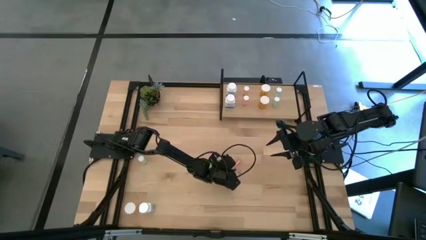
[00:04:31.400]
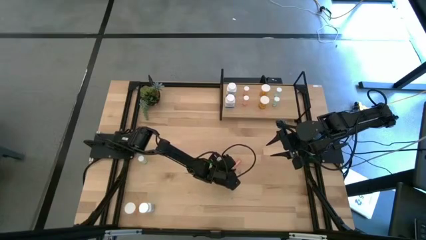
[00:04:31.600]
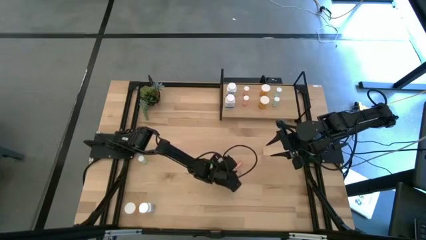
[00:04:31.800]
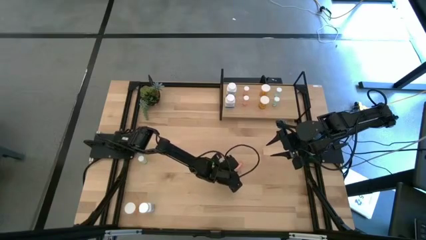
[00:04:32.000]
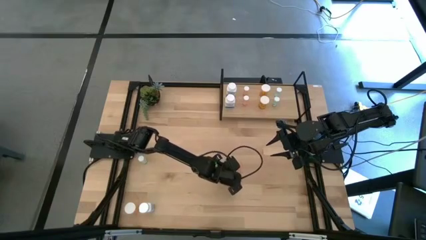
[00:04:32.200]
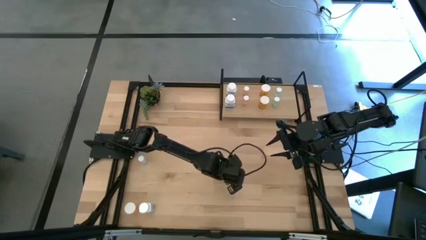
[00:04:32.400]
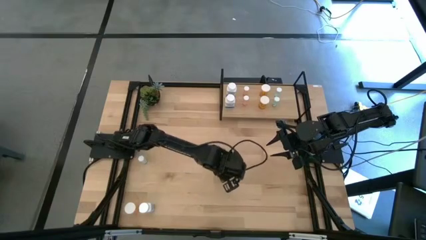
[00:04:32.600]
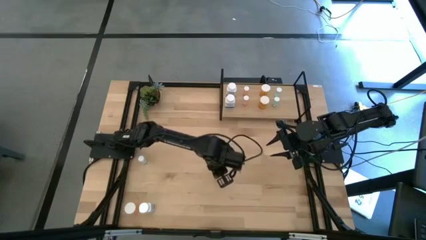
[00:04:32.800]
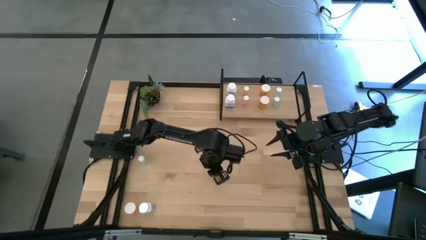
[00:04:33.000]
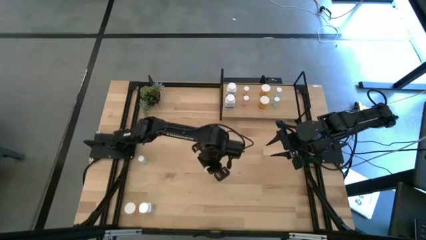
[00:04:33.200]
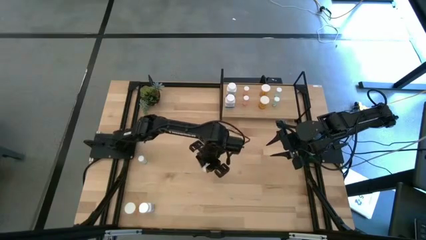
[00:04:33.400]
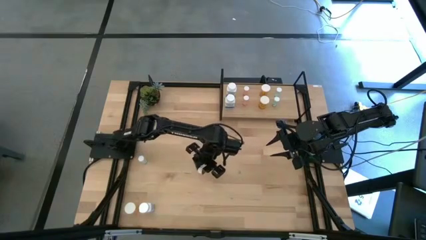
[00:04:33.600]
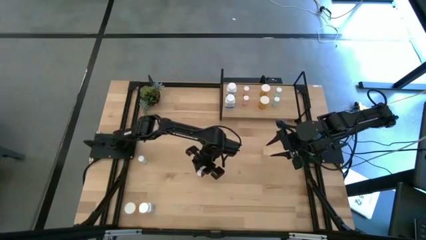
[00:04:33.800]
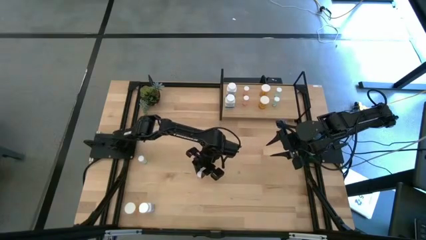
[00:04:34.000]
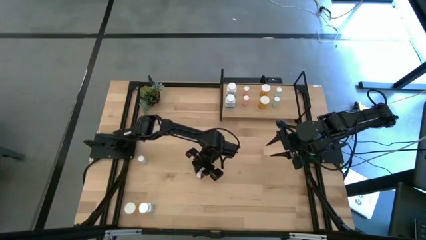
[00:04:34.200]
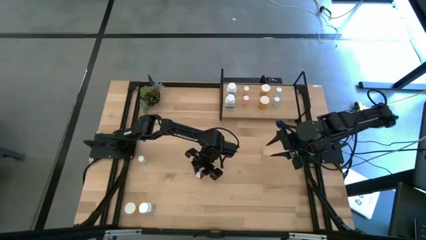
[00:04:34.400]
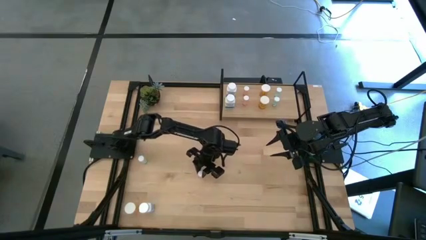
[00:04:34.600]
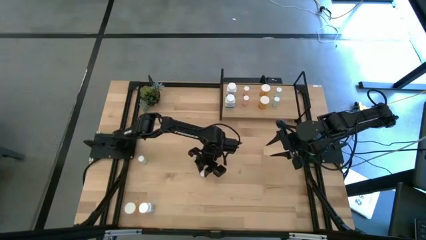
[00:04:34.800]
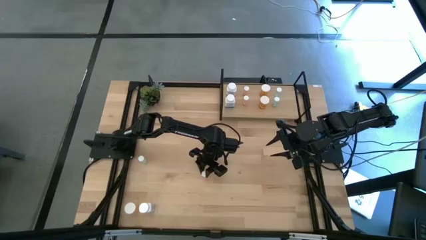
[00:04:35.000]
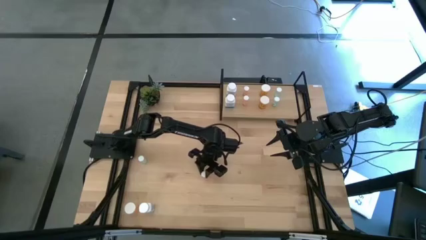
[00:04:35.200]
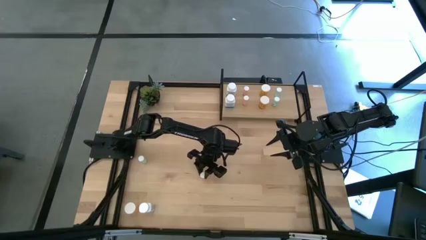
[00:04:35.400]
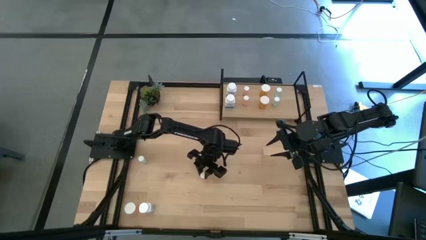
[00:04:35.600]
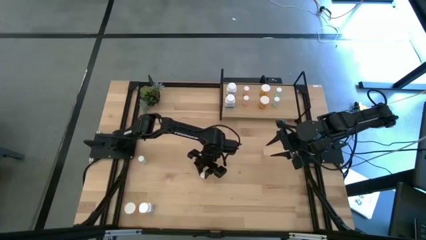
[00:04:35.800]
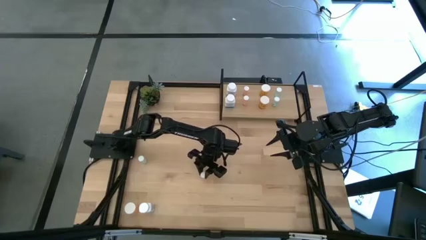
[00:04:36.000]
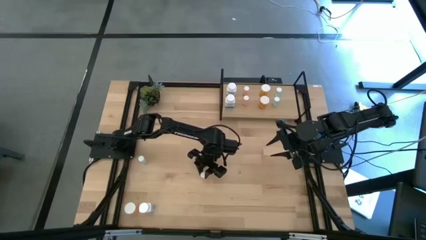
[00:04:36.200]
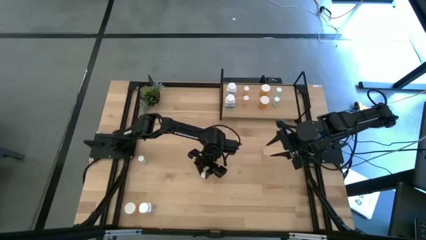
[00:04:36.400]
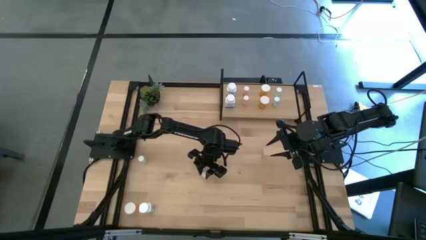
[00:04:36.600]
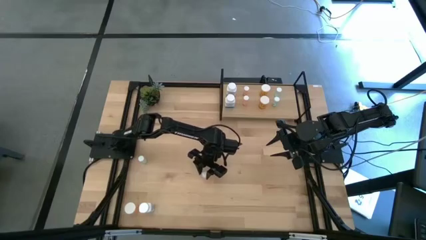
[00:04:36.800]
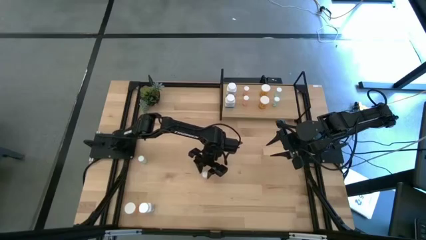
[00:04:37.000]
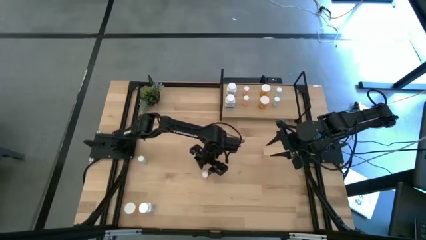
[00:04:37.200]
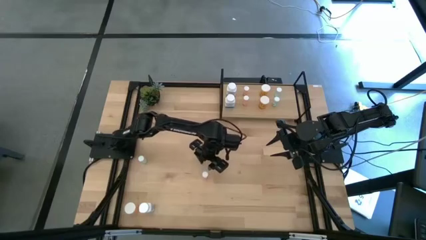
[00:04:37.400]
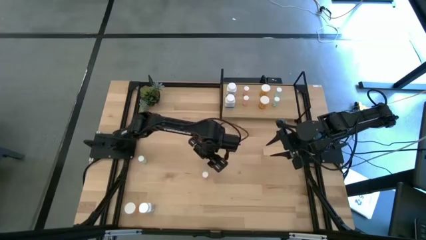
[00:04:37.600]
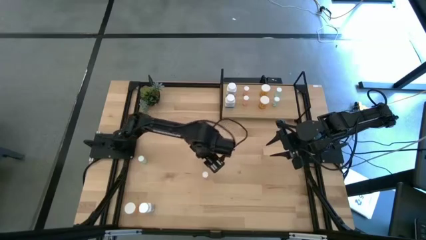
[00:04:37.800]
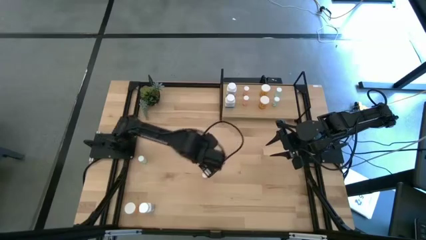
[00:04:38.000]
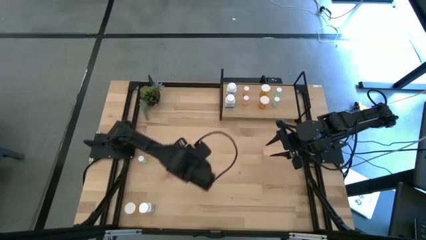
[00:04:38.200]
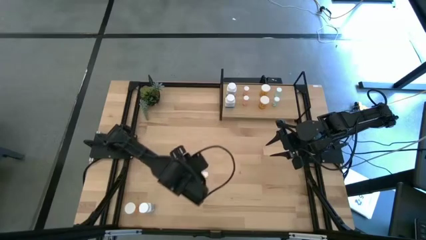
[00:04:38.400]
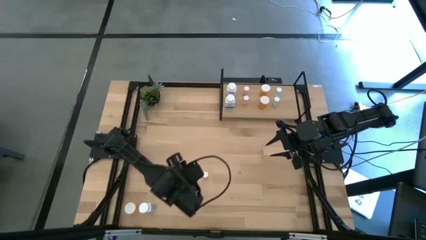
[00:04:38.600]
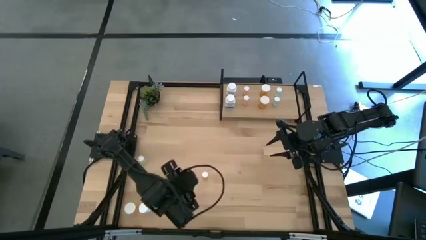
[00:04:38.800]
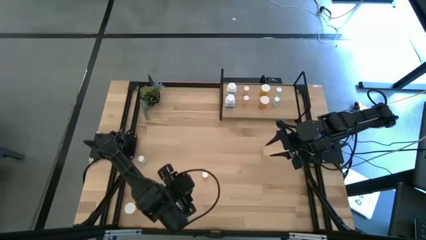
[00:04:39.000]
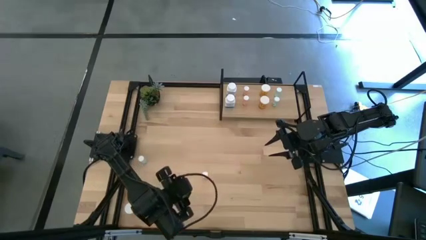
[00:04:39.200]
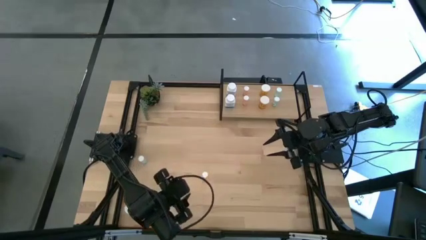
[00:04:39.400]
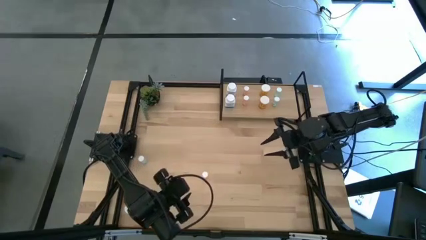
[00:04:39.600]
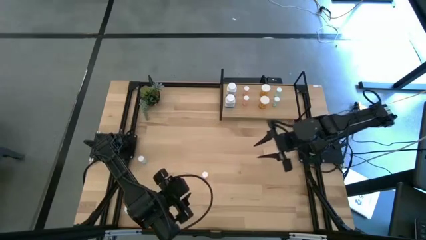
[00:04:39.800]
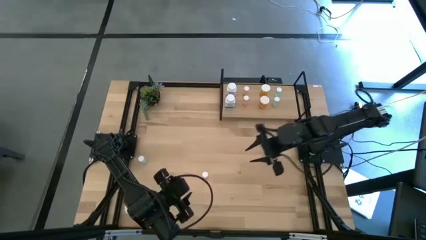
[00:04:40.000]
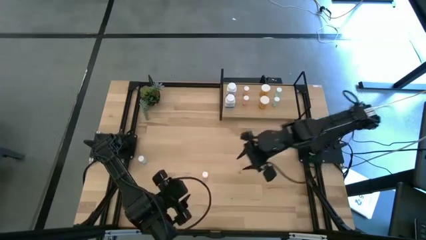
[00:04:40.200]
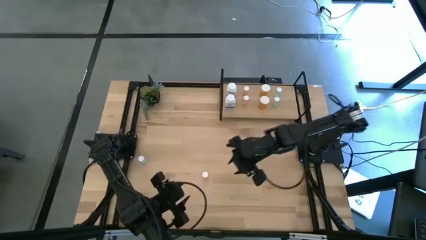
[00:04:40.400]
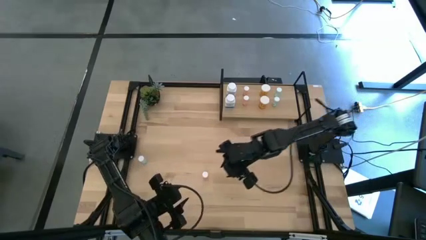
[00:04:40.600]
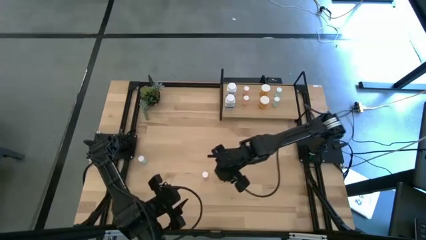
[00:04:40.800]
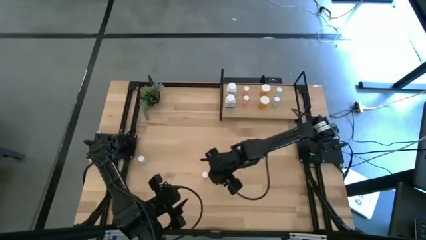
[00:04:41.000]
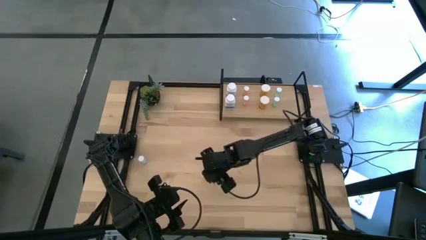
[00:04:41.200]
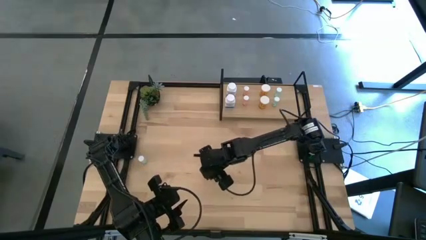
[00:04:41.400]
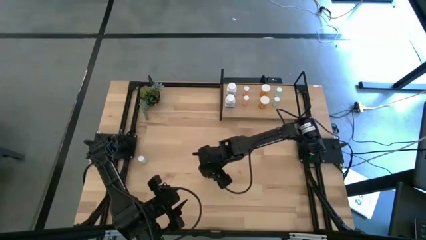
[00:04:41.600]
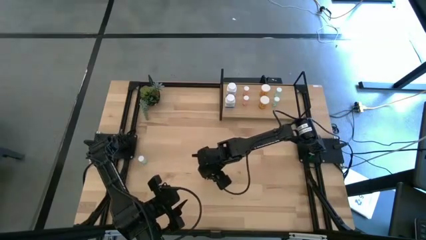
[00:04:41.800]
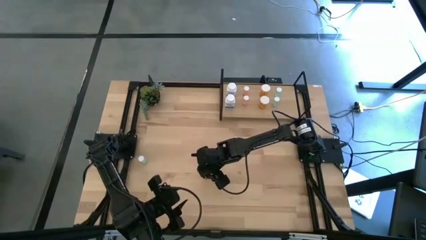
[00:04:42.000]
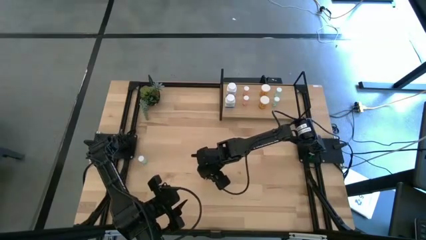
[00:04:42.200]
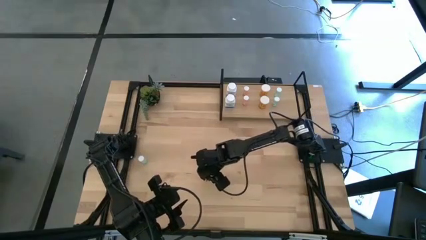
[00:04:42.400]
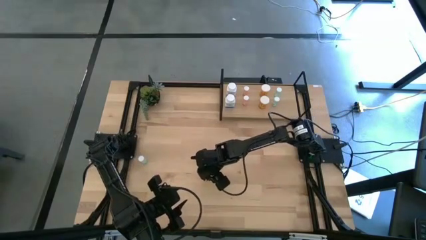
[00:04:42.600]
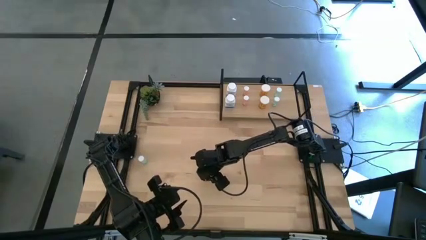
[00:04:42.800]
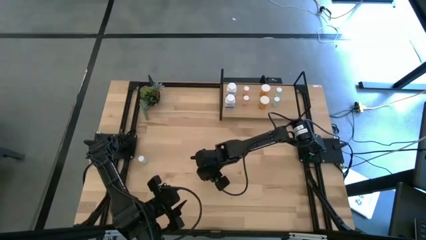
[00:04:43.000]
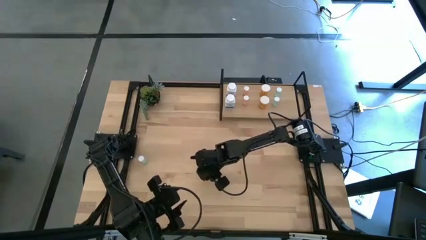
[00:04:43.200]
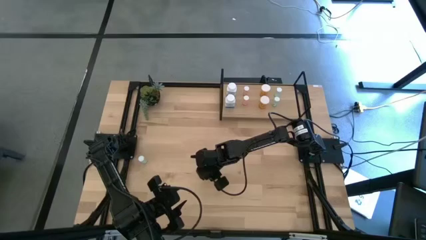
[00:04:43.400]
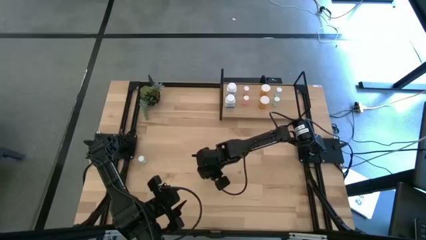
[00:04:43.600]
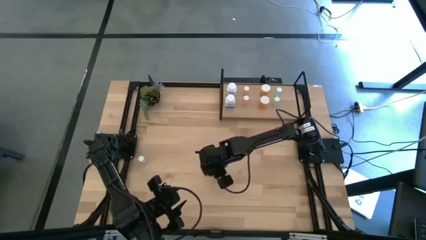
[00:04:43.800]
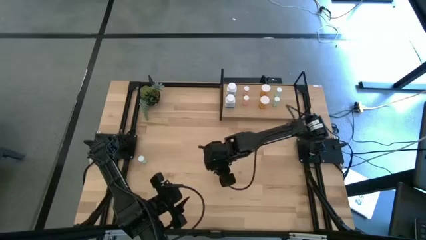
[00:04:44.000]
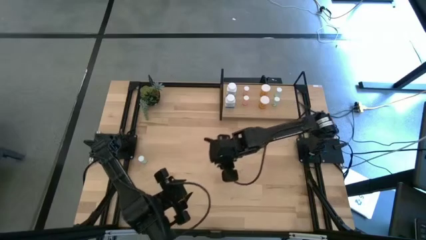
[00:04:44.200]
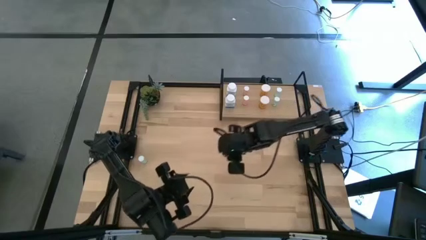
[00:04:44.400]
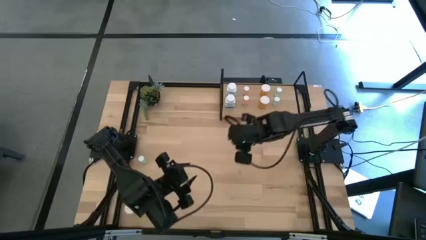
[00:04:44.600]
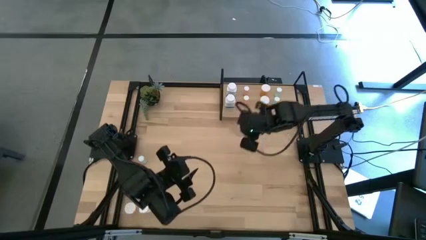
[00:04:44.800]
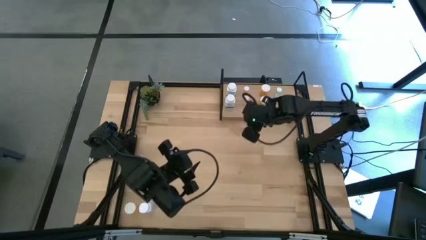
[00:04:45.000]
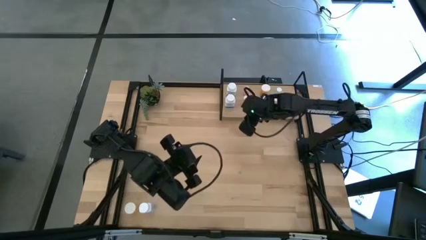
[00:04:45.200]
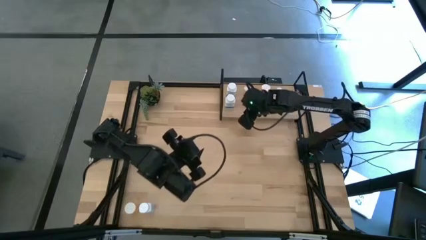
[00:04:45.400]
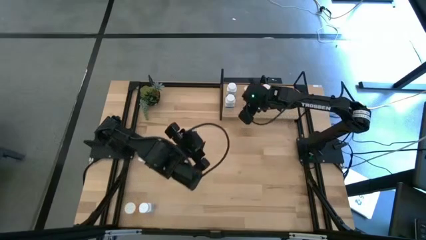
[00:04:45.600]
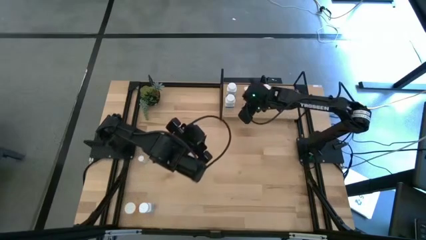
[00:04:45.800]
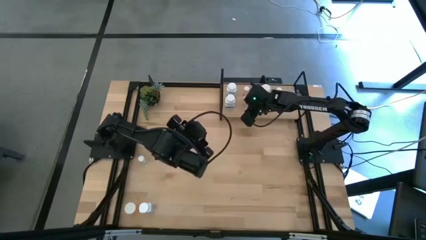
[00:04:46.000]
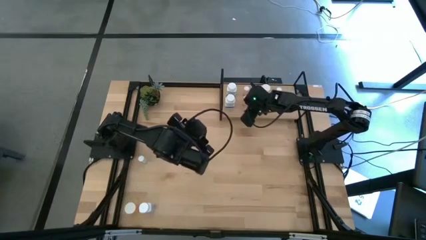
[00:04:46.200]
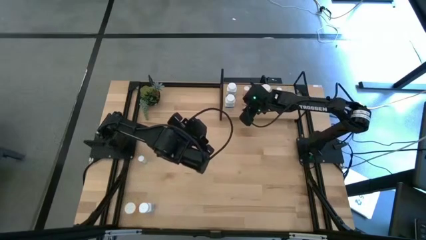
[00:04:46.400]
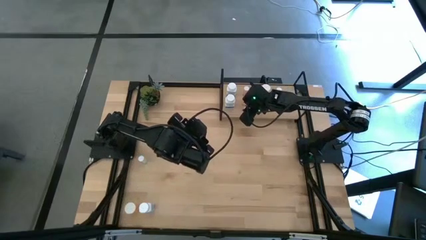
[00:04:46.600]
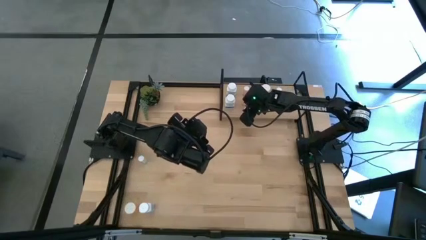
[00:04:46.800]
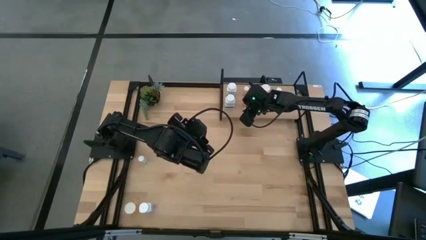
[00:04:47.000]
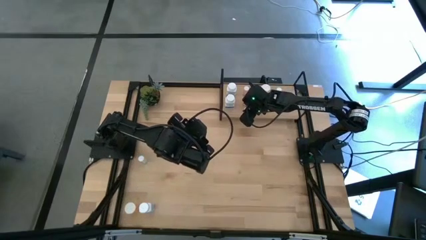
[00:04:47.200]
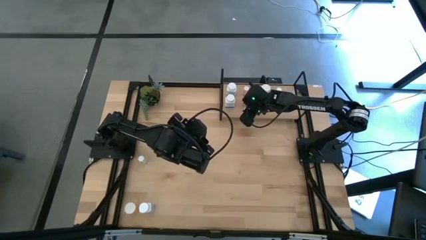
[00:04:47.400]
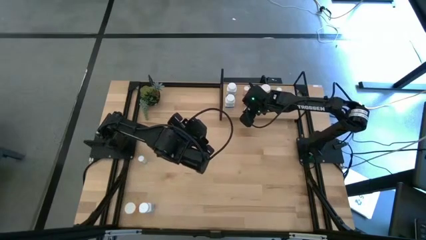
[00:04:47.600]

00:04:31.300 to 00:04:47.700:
Task: Pick and place medicine bottles onto shelf by color
Put the pink pill bottle on the shelf aligned with the other pink pill bottles
